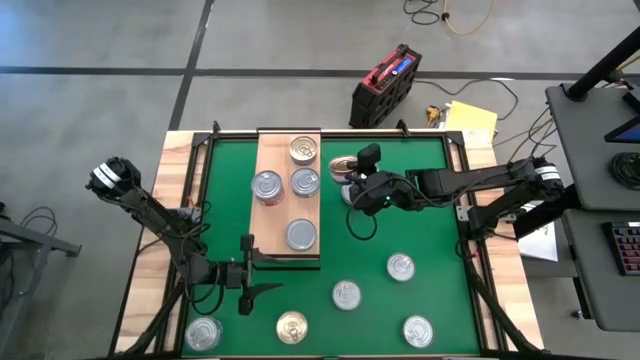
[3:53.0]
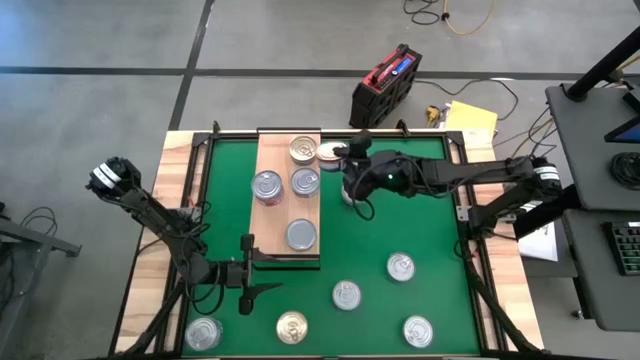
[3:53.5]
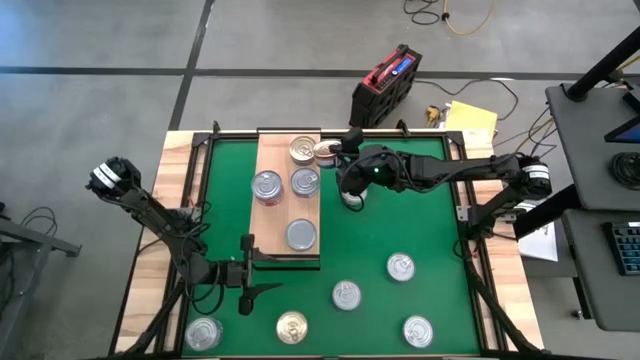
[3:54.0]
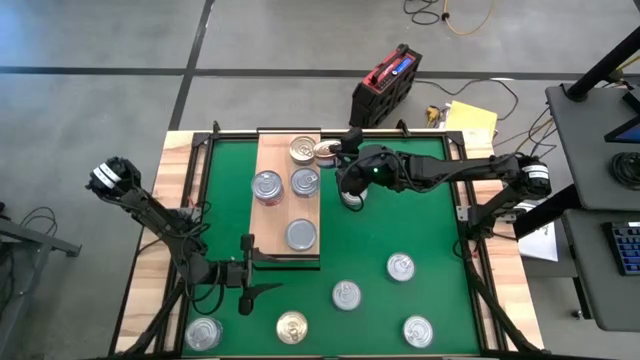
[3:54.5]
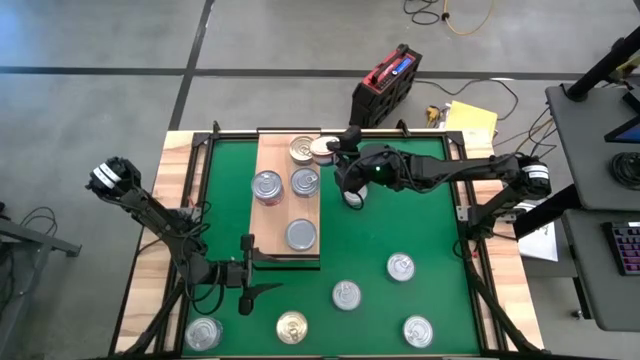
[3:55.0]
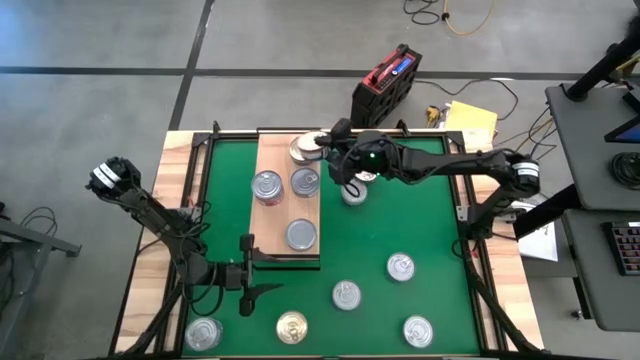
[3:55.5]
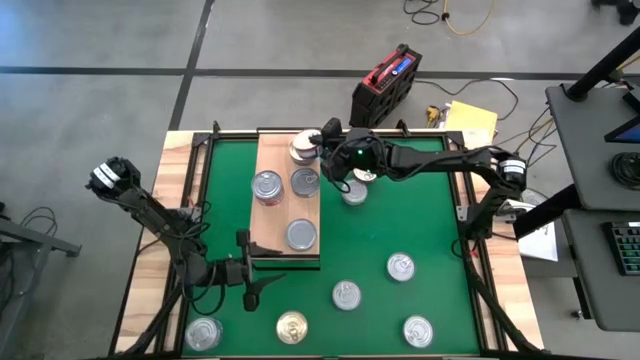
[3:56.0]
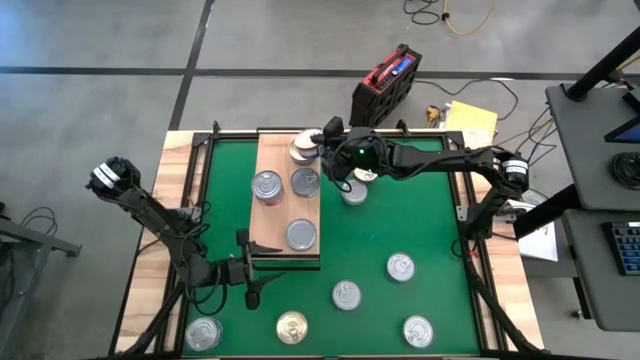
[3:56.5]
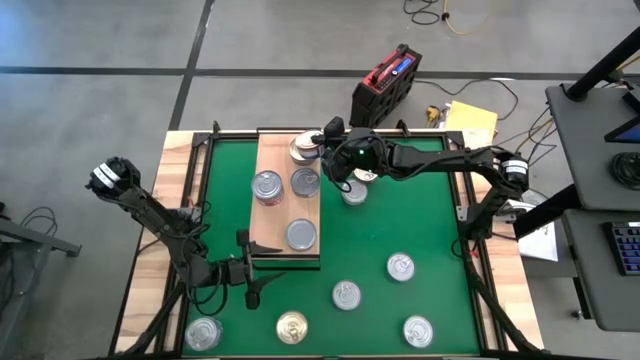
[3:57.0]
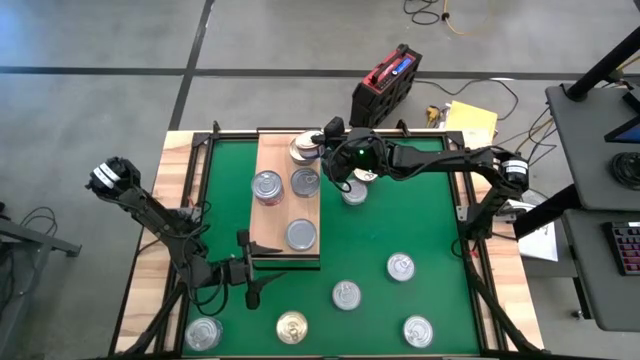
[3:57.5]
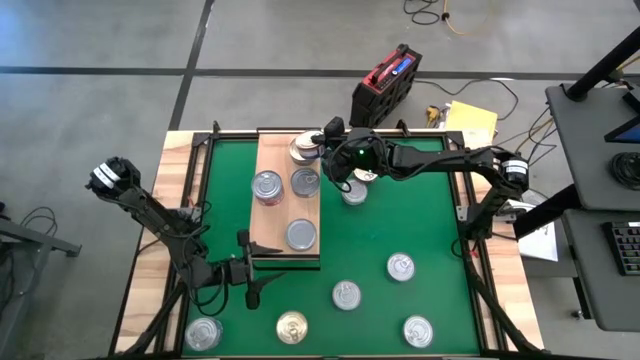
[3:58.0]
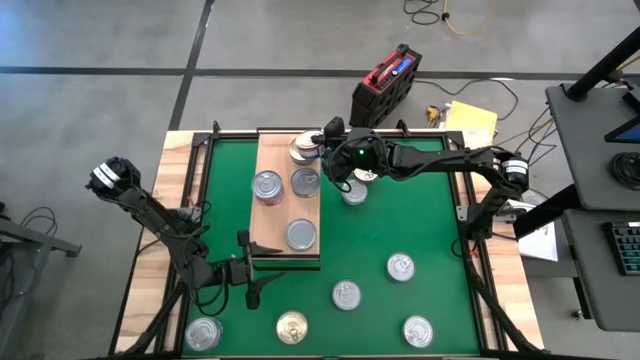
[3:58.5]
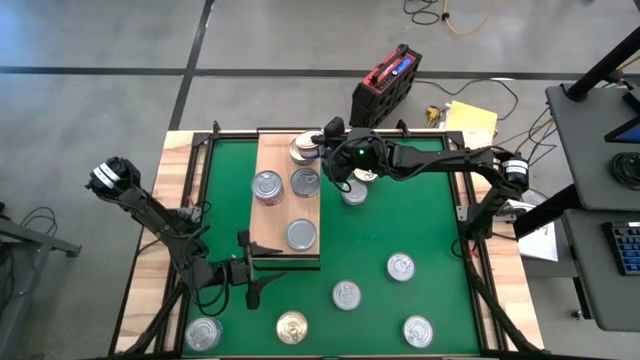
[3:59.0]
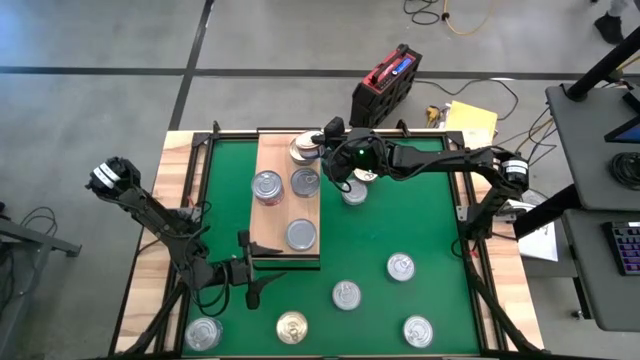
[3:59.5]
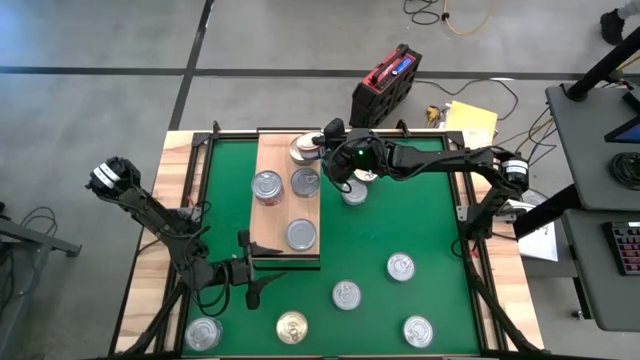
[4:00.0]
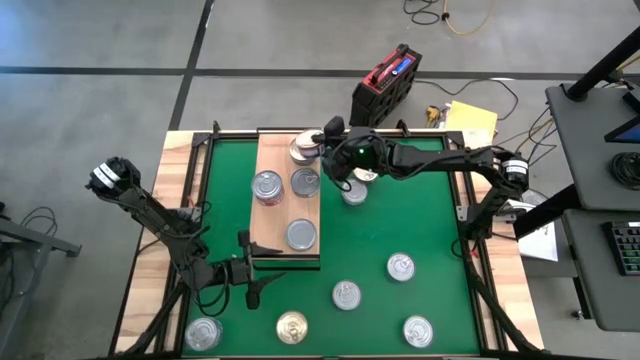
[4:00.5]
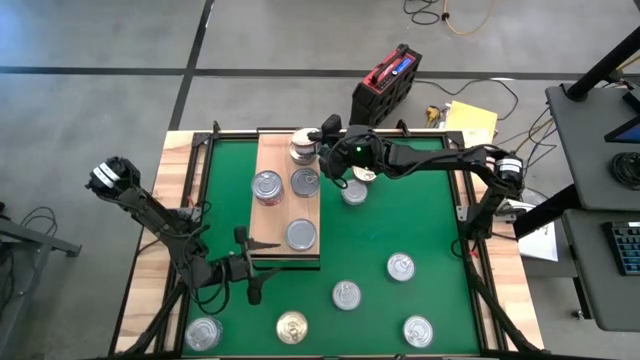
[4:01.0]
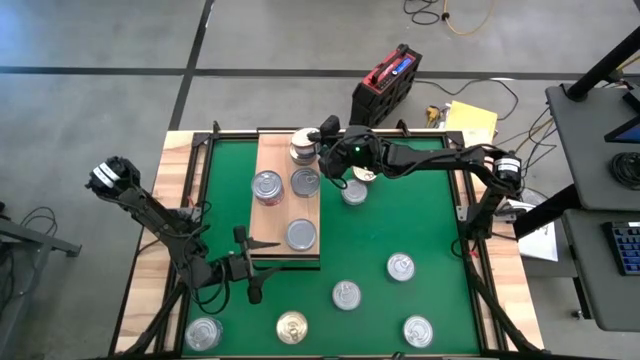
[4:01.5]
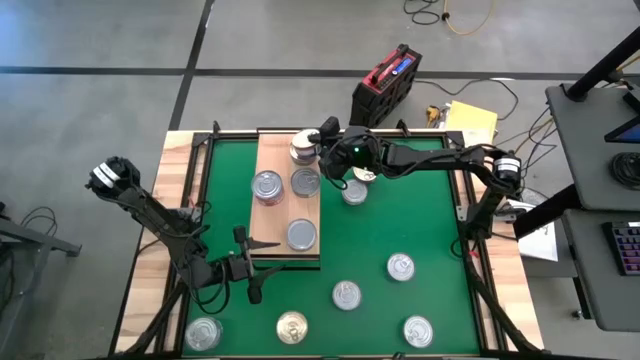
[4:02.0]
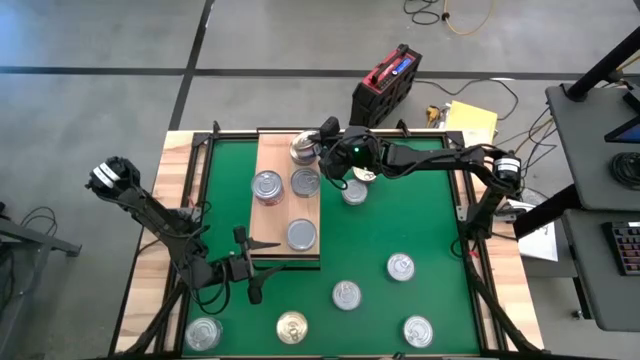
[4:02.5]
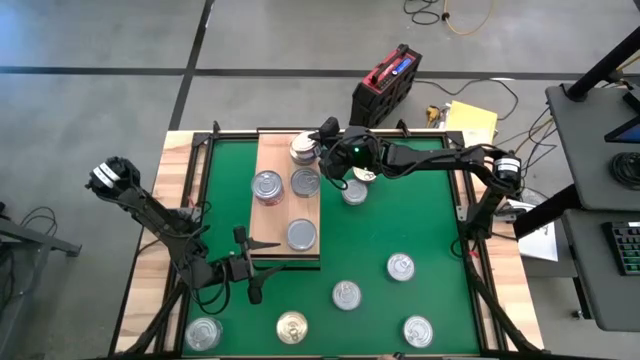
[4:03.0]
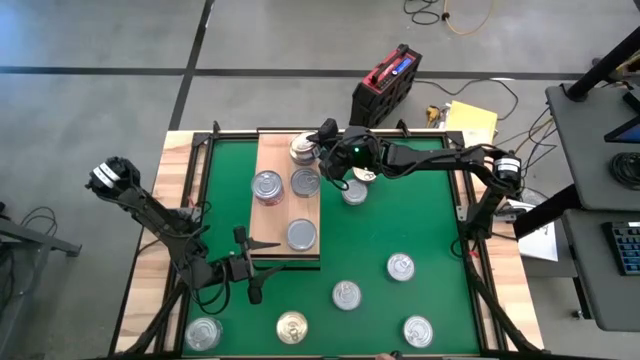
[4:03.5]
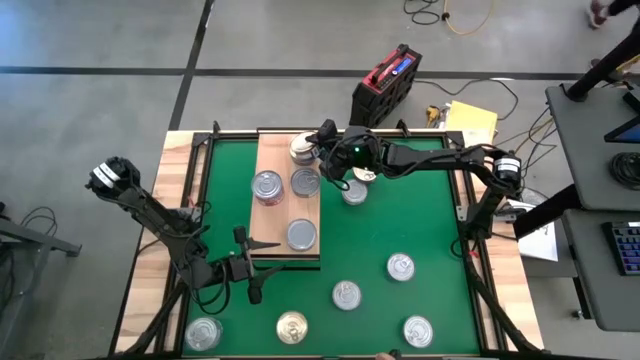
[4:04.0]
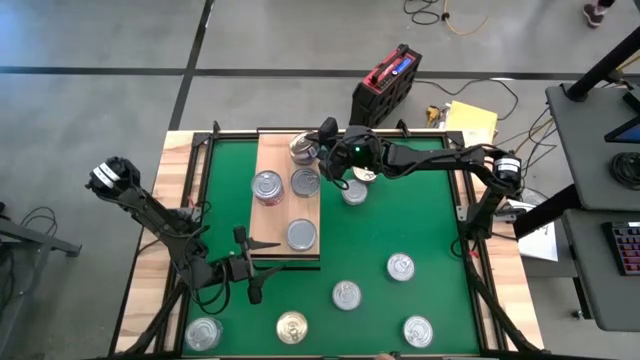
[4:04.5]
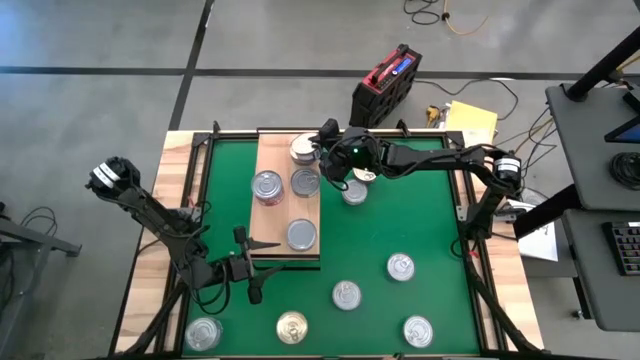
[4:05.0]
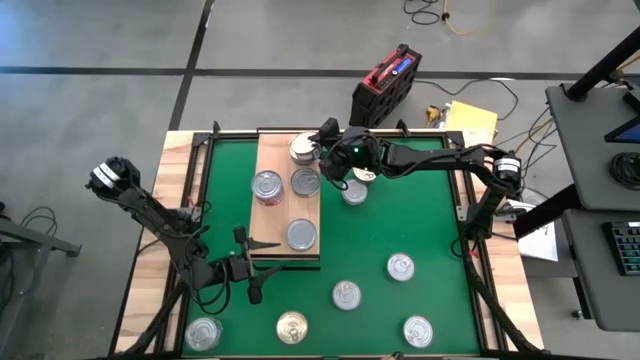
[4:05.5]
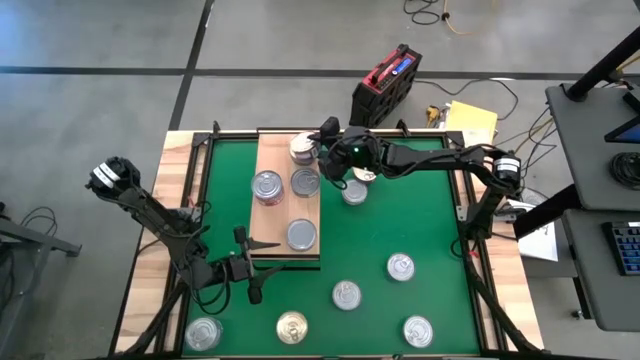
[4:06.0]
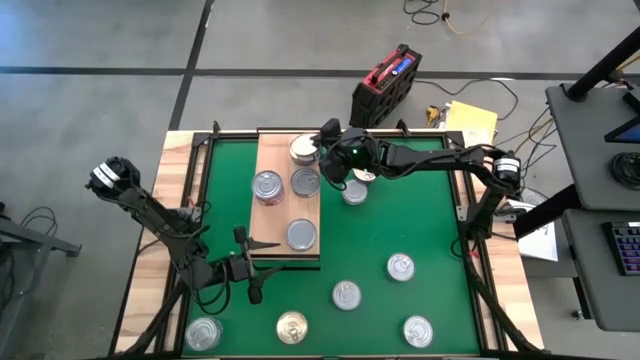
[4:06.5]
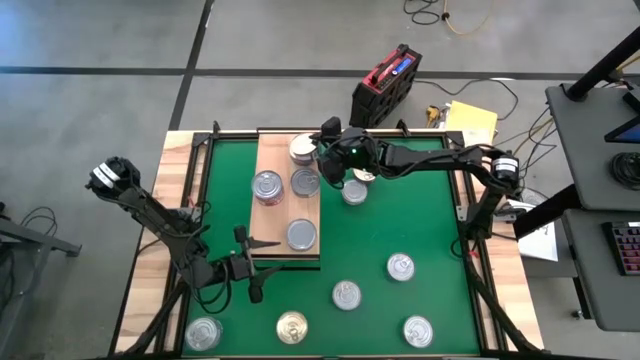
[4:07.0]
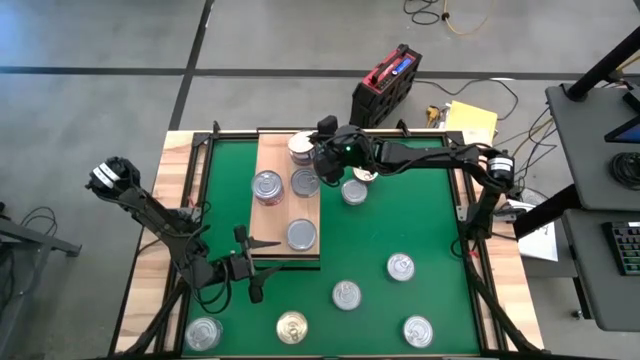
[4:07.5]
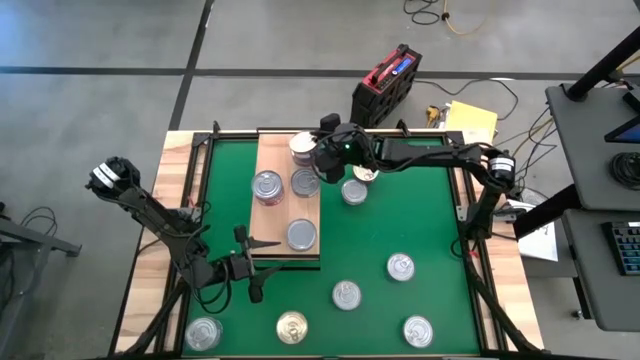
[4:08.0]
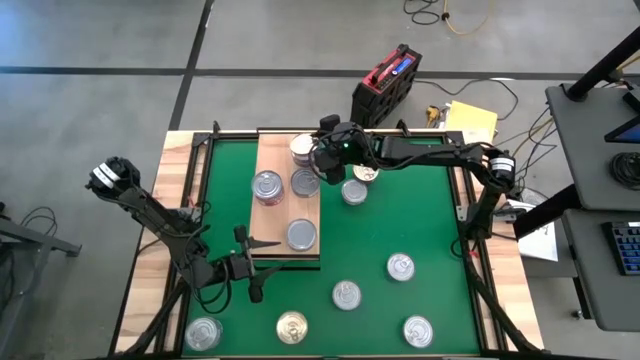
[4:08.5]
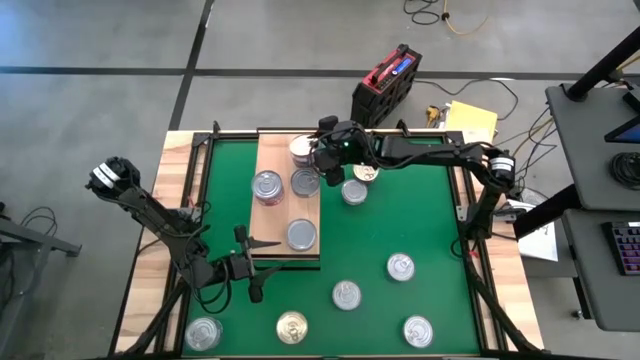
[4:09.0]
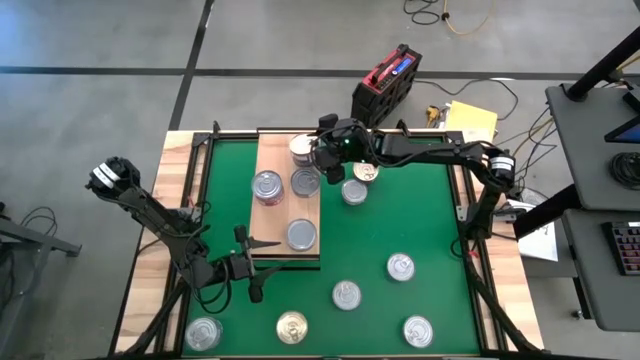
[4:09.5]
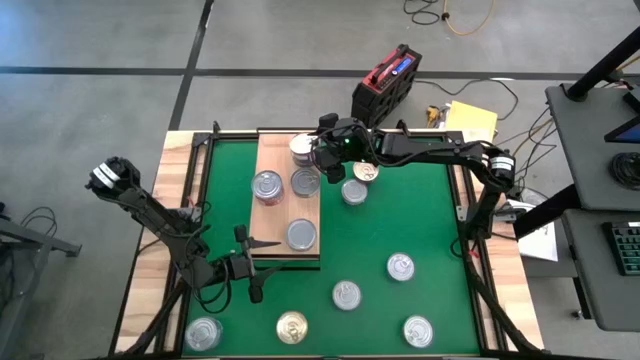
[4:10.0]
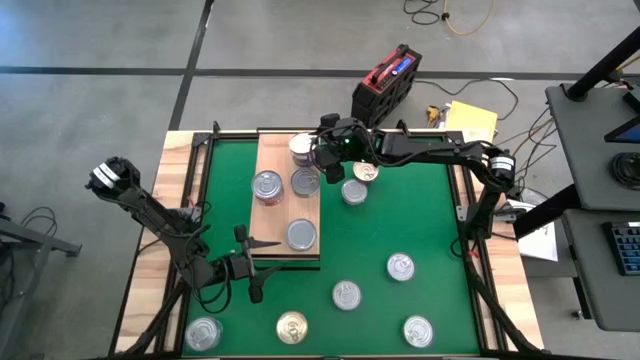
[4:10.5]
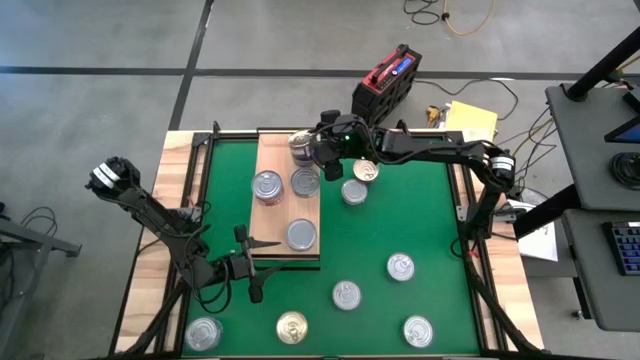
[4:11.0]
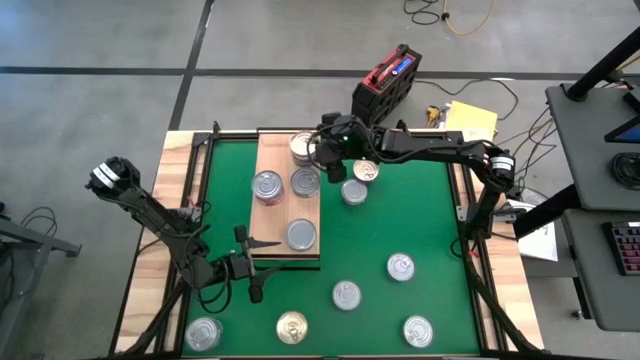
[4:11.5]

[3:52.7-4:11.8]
Task: Stack canned seafood by type on shelf
Stack the blue and pink tuna can on top of the blue tuna can on the shelf

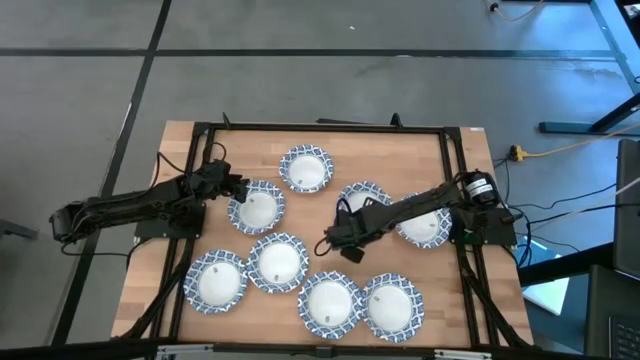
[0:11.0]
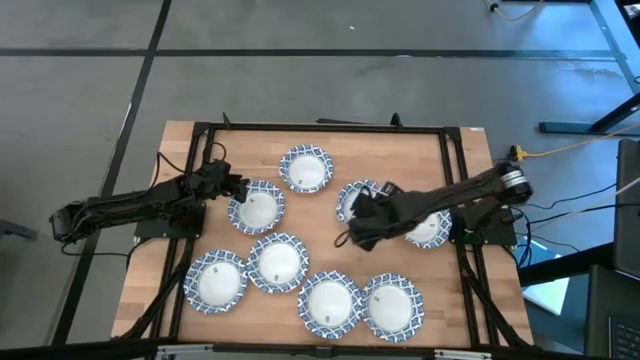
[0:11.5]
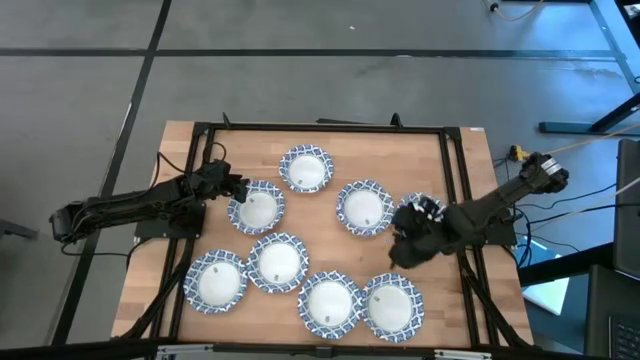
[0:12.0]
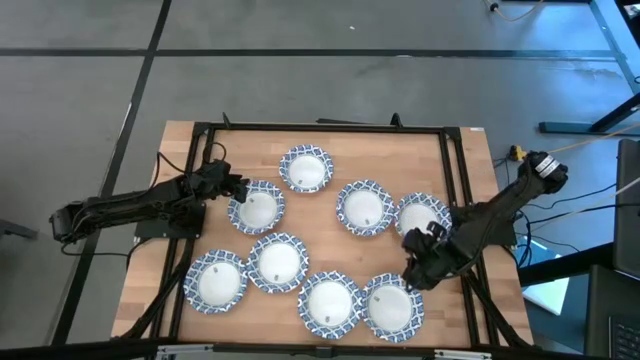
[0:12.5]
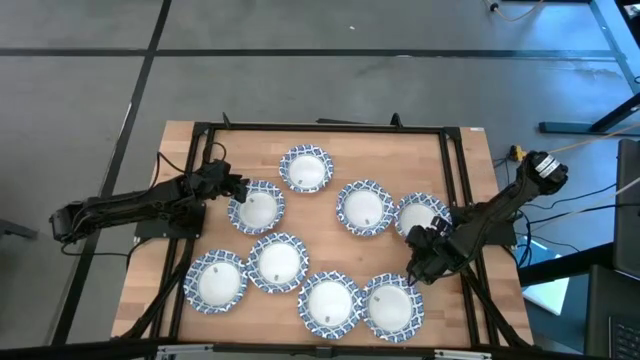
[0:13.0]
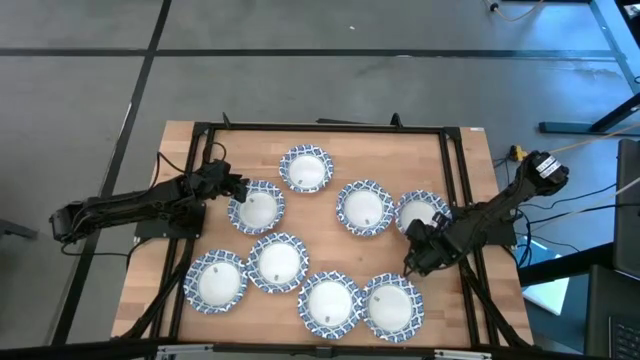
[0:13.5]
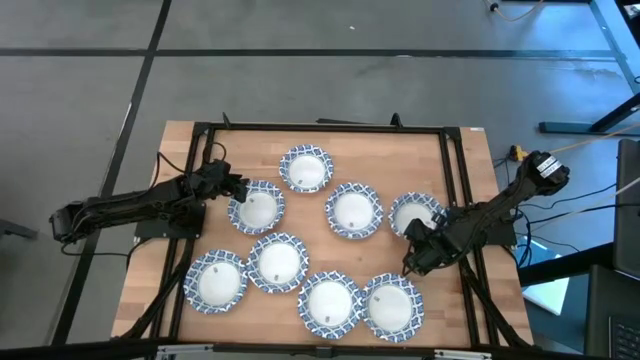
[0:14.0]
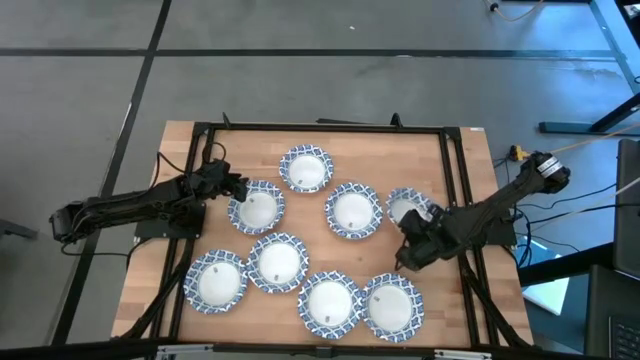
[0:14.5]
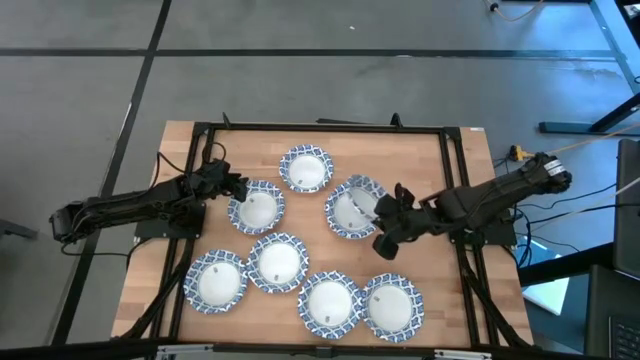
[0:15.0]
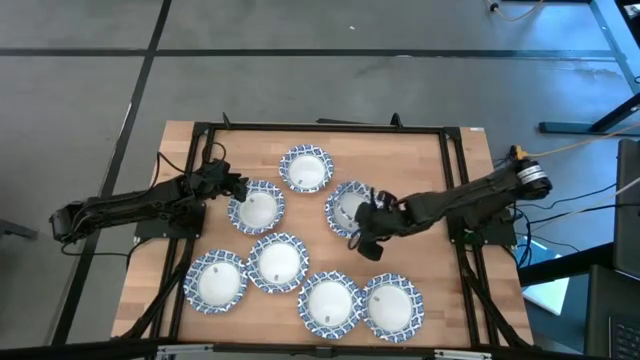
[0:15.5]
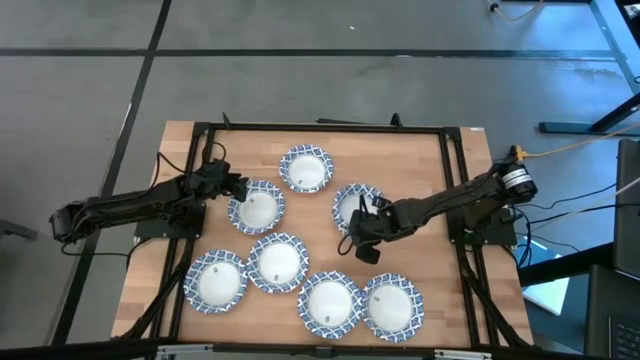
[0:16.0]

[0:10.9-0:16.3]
Task: Nest bowls inside each other
Stack the white patterned bowl on the white patterned bowl
